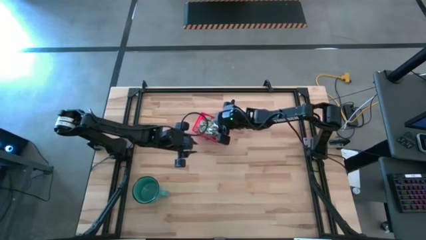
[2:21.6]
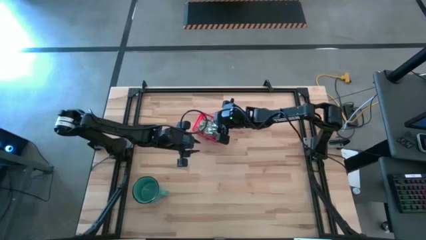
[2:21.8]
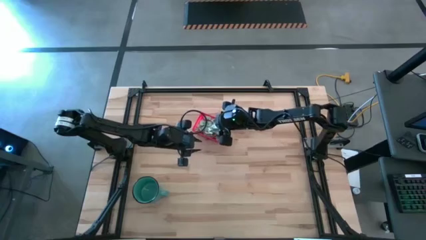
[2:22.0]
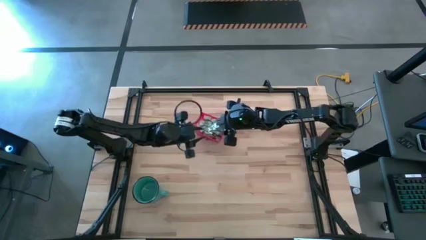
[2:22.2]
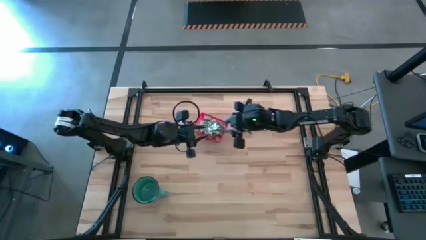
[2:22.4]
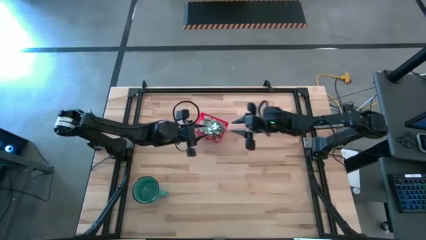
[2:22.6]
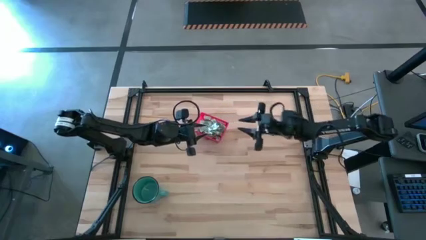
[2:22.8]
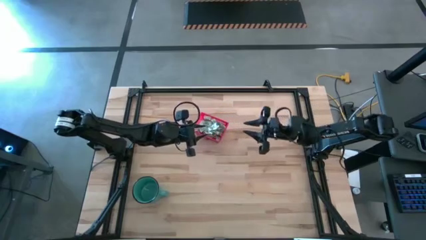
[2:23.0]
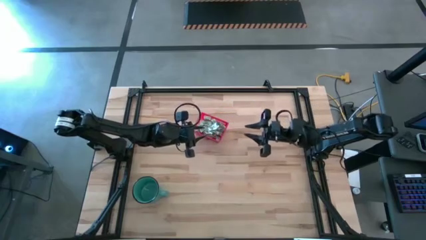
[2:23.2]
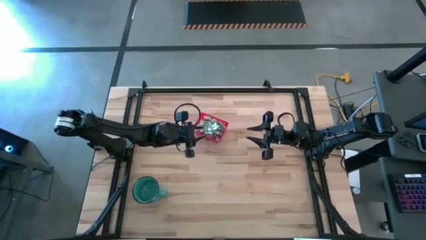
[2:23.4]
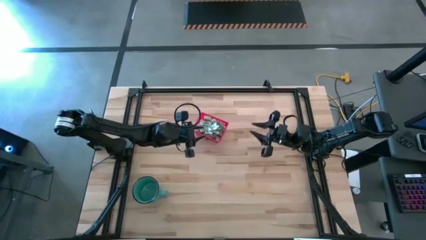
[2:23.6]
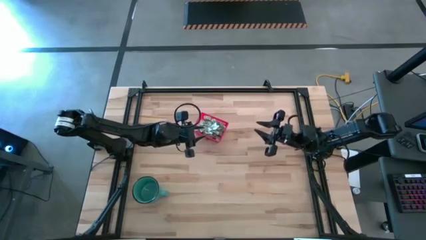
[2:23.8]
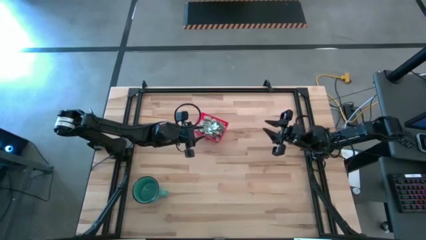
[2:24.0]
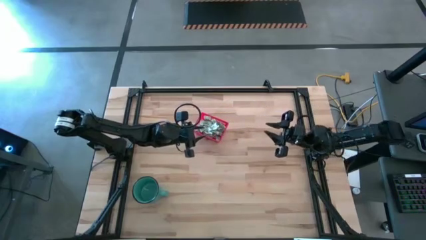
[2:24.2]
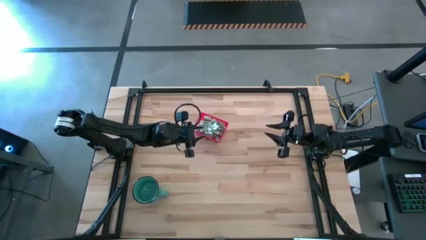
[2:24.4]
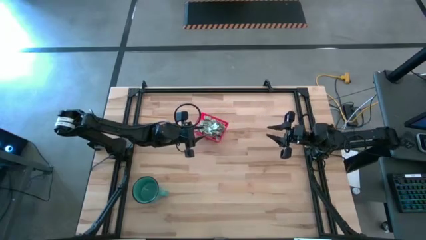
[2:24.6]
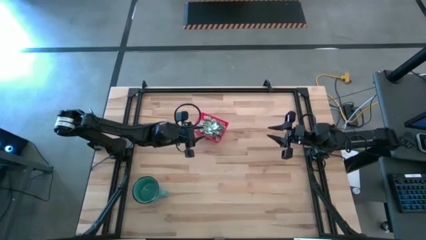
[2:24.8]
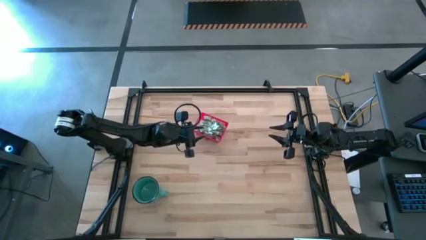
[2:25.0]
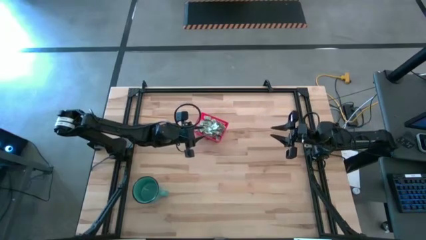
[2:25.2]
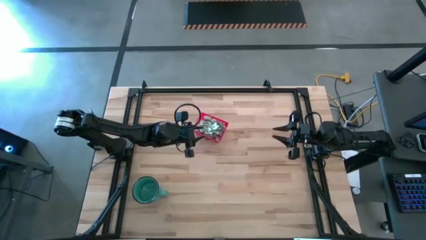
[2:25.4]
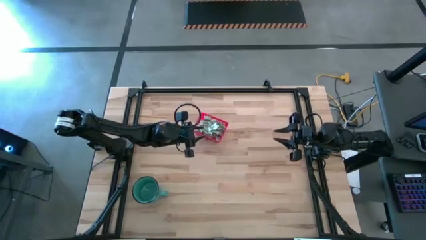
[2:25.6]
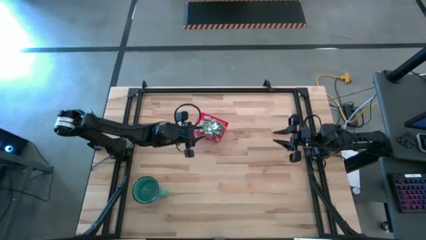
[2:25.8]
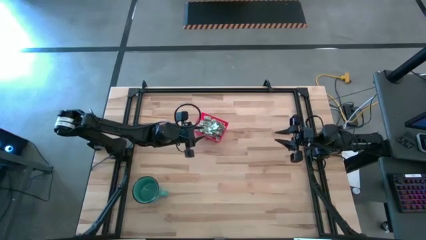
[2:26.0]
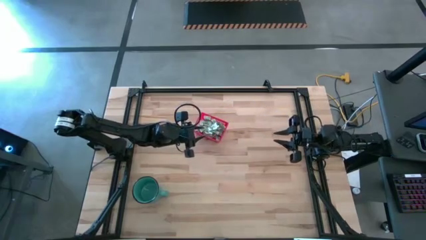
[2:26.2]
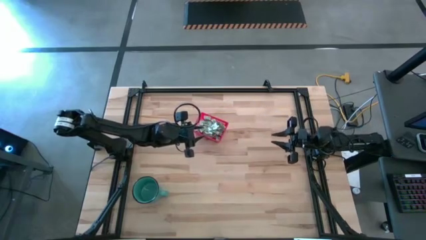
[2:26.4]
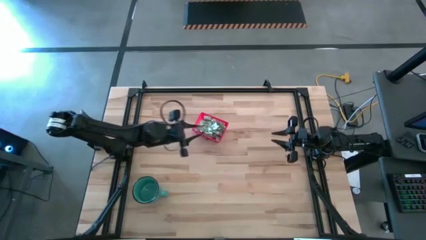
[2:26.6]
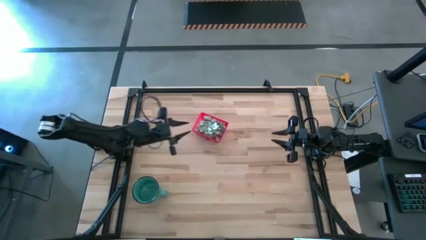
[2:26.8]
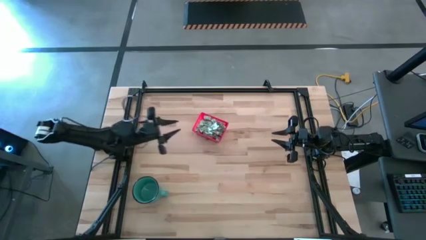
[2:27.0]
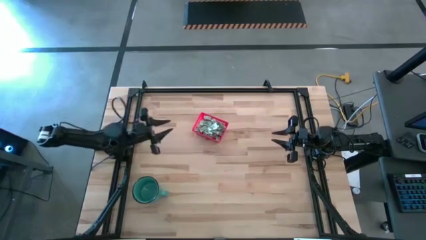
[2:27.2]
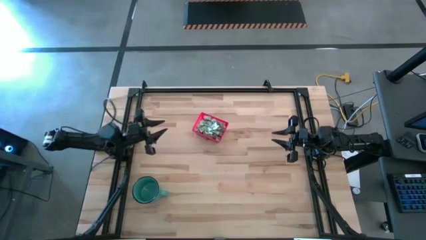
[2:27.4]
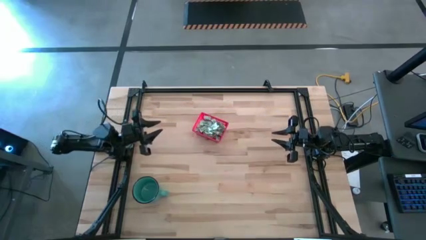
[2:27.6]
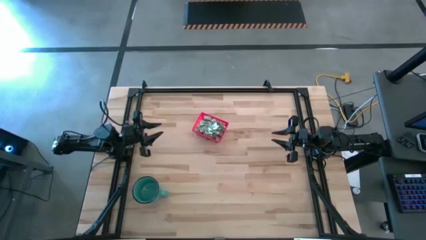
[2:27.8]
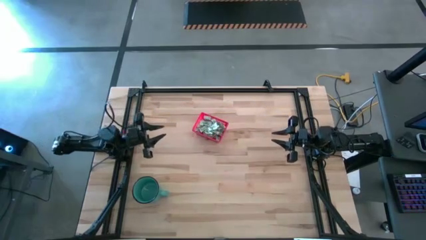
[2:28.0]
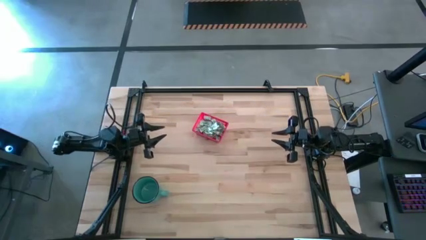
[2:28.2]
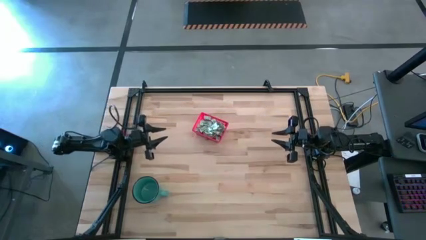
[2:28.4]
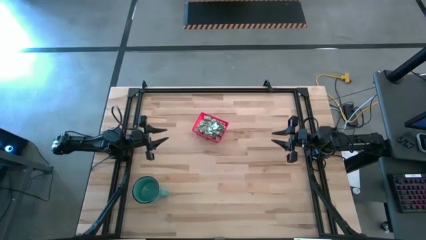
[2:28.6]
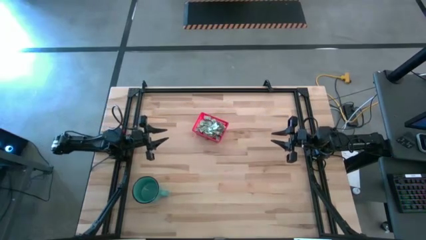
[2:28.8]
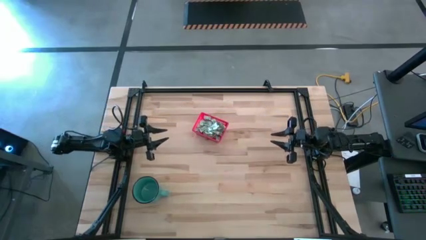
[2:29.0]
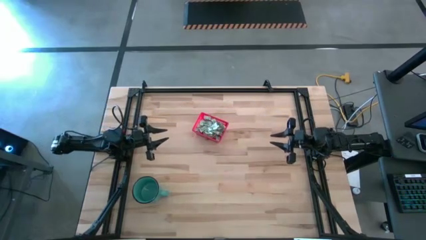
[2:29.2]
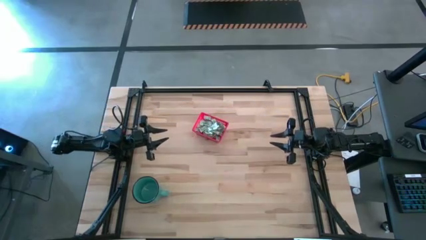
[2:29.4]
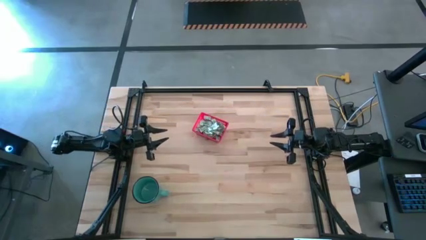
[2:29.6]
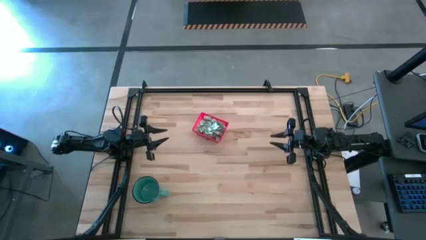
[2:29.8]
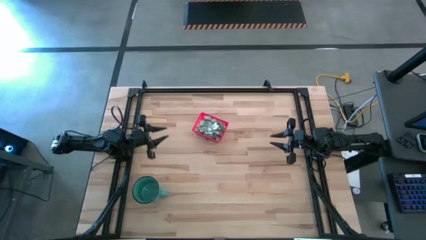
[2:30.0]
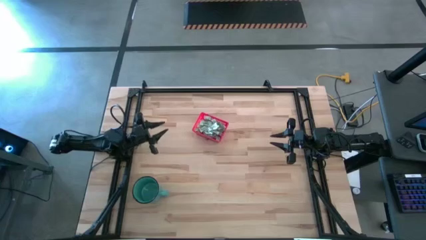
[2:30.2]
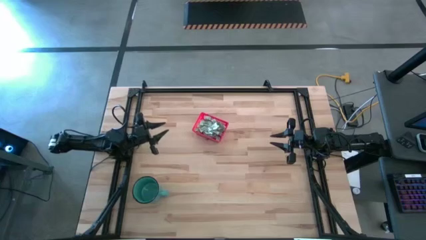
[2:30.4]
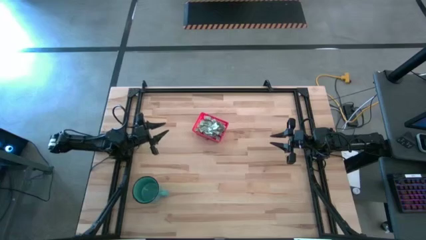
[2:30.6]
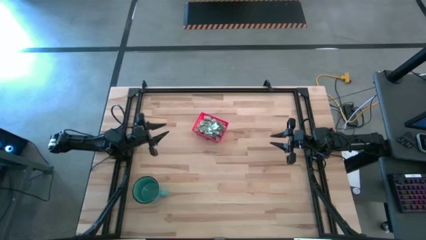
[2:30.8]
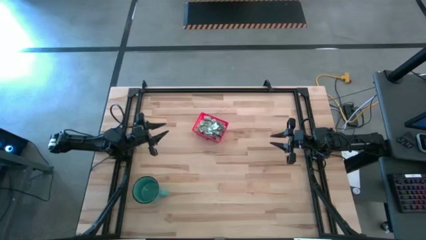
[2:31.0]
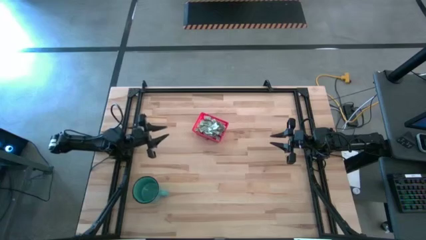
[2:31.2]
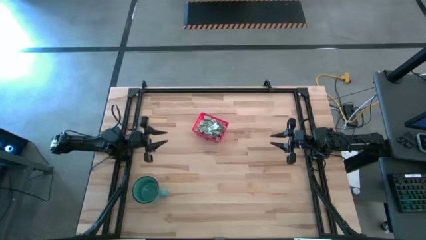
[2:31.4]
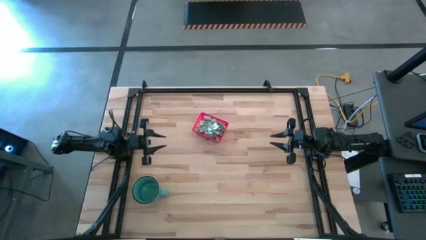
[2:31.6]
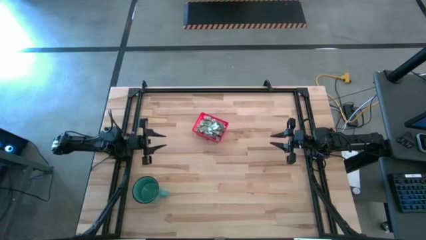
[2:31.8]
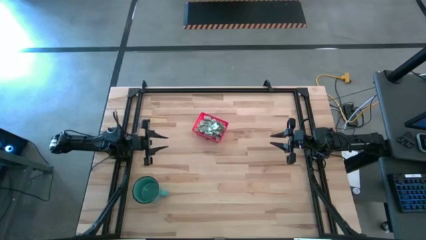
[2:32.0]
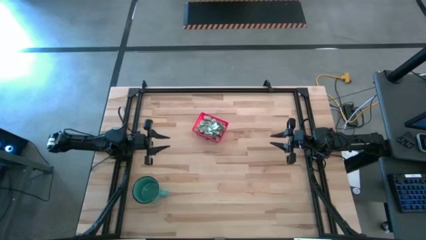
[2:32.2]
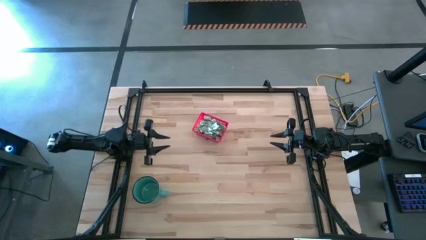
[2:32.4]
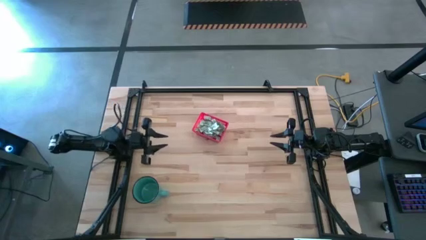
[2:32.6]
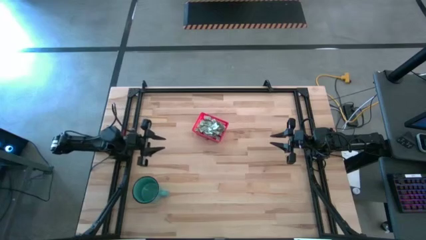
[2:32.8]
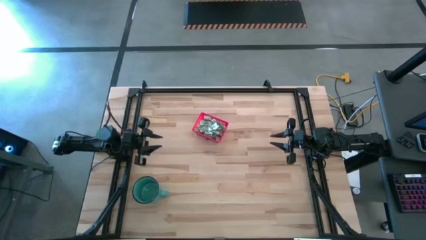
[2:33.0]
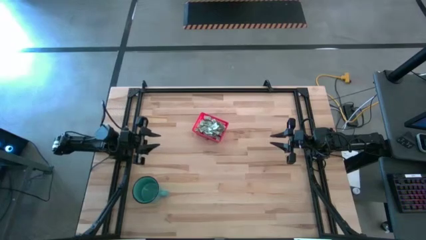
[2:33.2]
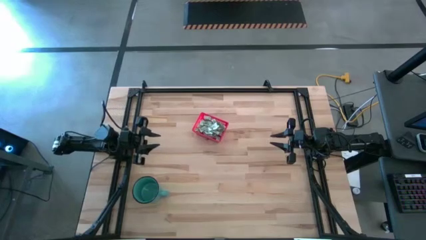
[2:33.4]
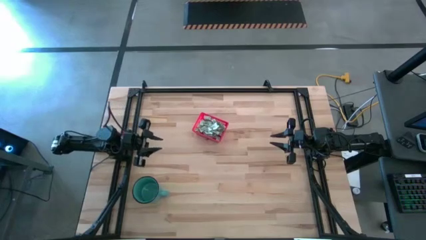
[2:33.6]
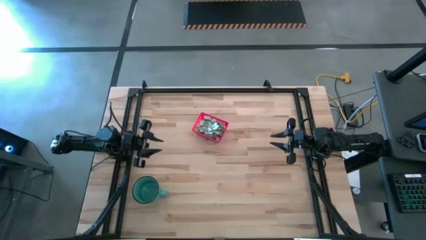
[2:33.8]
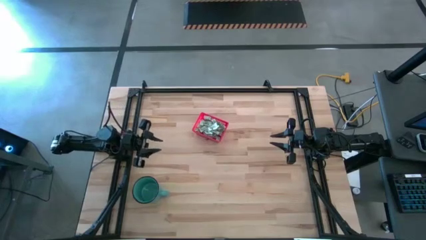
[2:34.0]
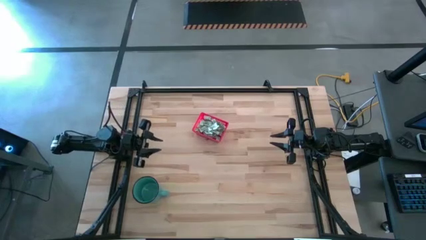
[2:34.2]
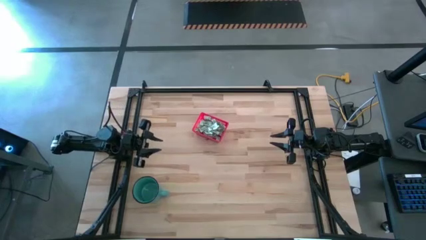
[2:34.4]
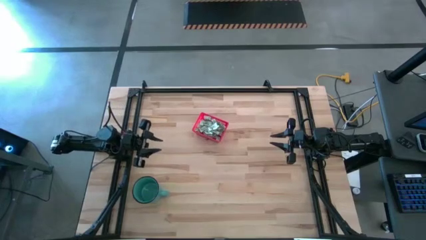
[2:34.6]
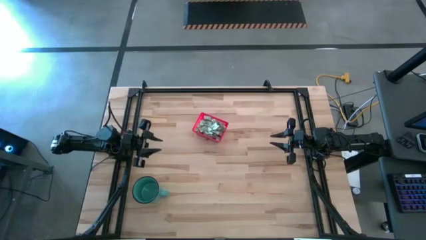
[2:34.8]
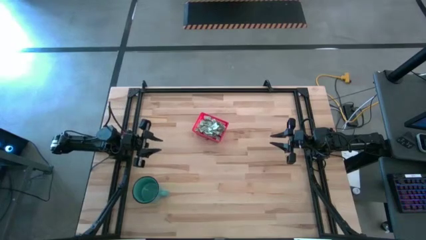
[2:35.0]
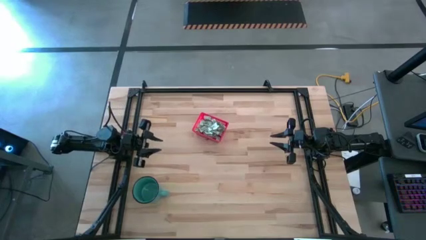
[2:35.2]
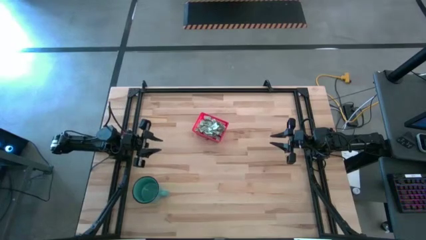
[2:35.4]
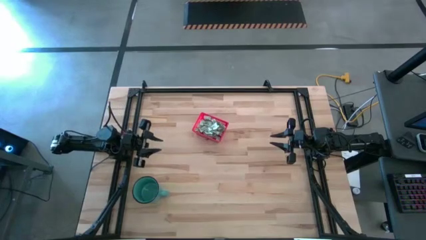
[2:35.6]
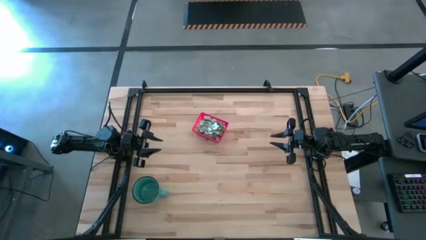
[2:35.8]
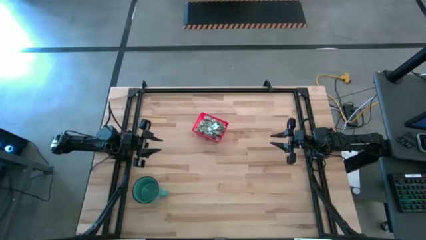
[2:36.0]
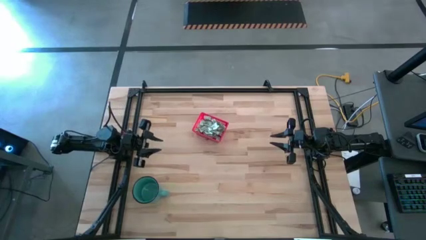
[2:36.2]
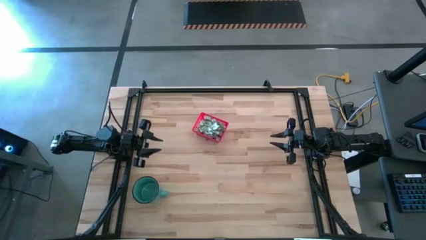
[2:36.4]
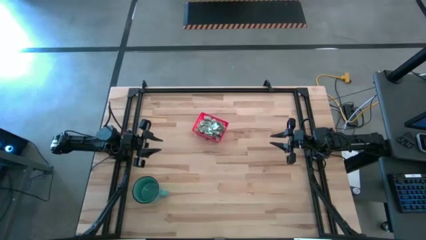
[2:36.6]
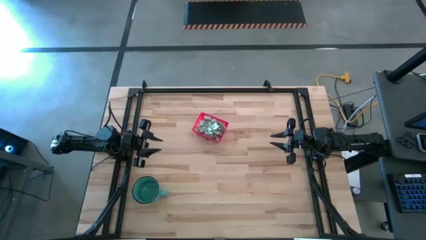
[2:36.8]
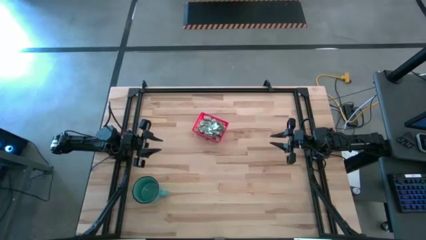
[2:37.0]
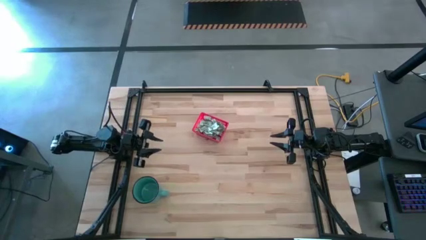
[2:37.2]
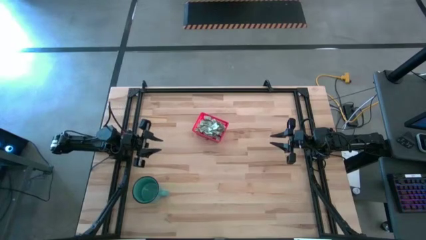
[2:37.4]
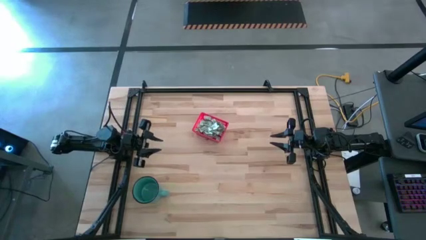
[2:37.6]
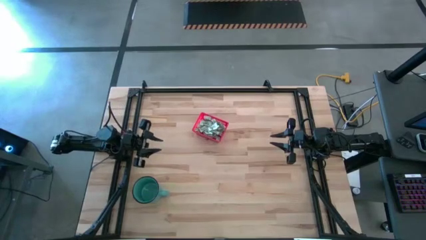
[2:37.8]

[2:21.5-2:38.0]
Task: Pick and place items into bin
Return to Home Position
